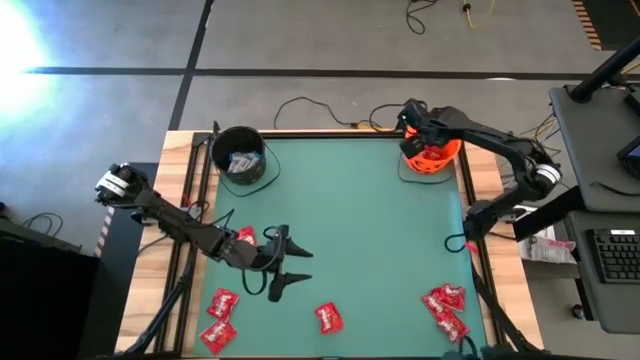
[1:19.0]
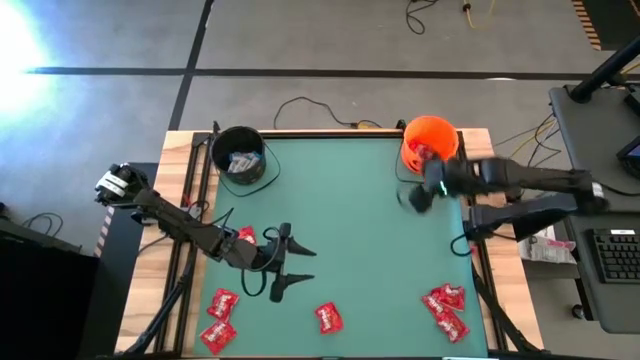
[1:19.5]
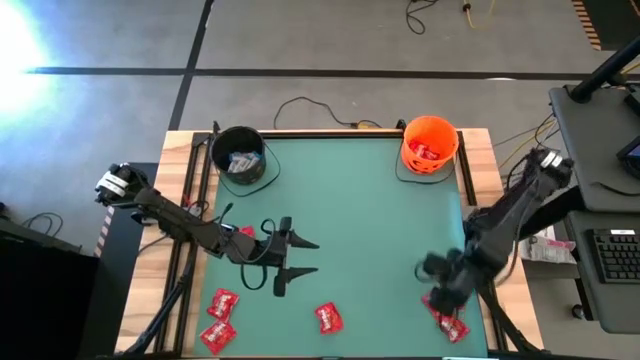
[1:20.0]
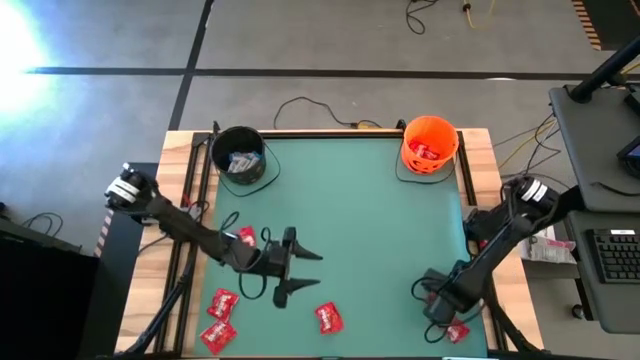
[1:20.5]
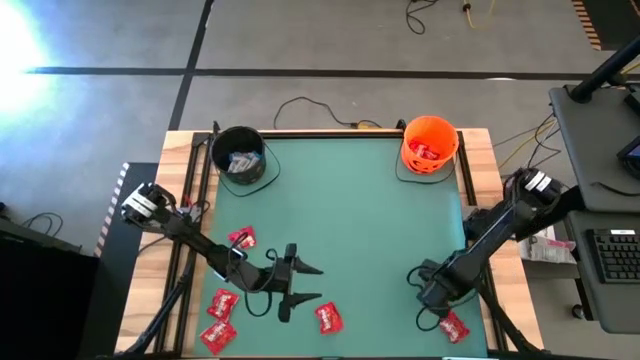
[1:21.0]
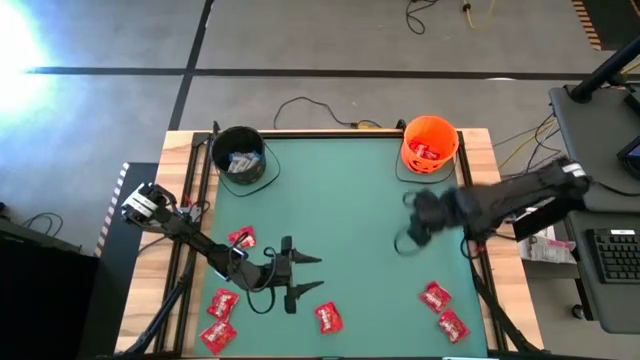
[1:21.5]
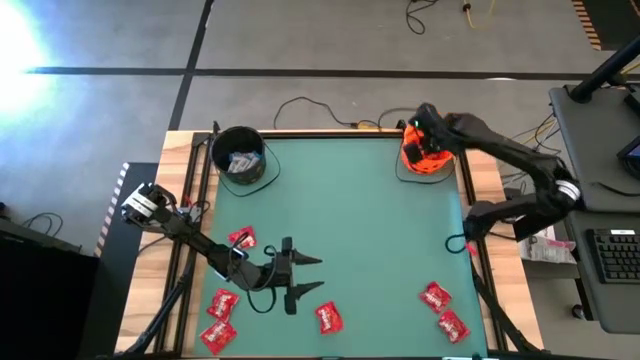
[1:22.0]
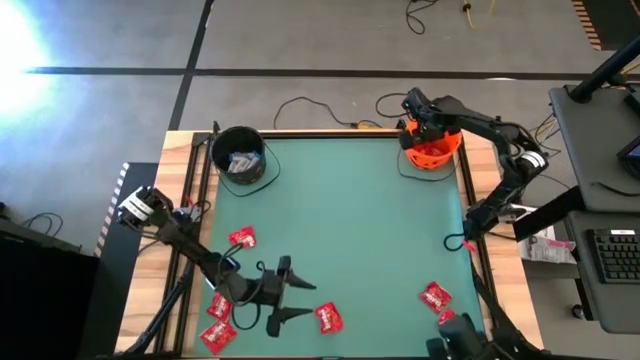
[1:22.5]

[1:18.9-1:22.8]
Task: Sort candy by brand, put in halloween buckets
Put the red candy into the orange bucket

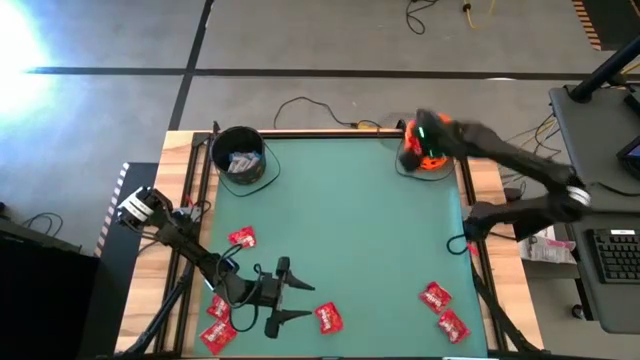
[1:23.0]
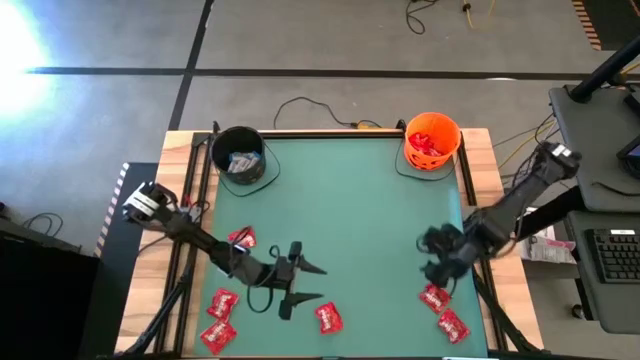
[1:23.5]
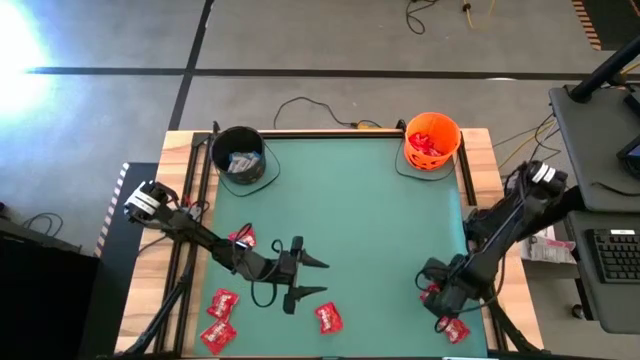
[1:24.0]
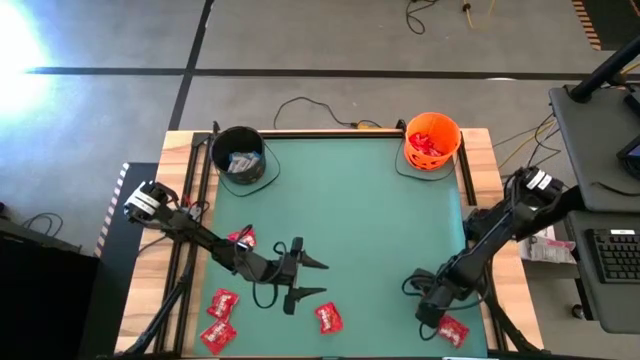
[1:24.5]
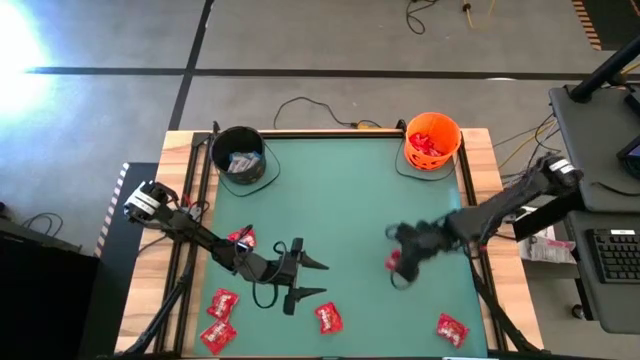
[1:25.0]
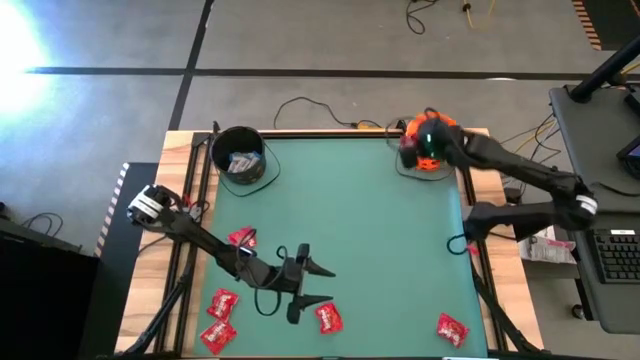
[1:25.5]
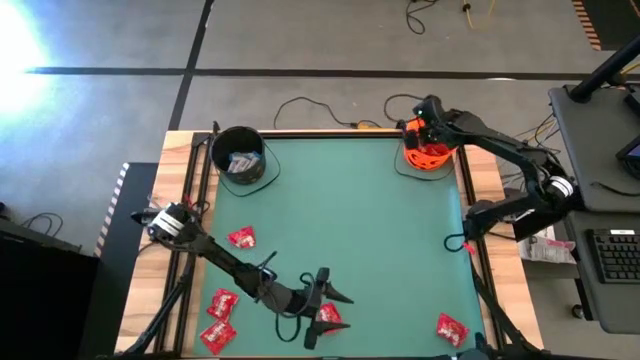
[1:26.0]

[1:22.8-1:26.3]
Put the red candy into the orange bucket

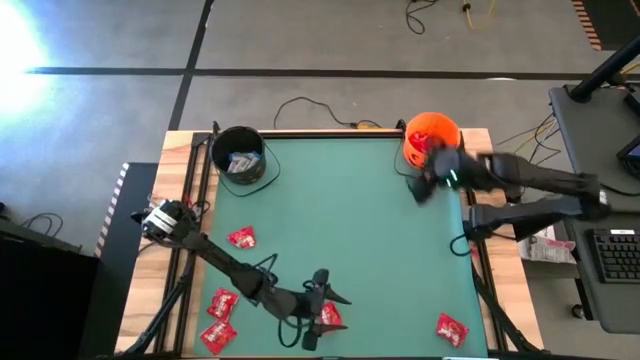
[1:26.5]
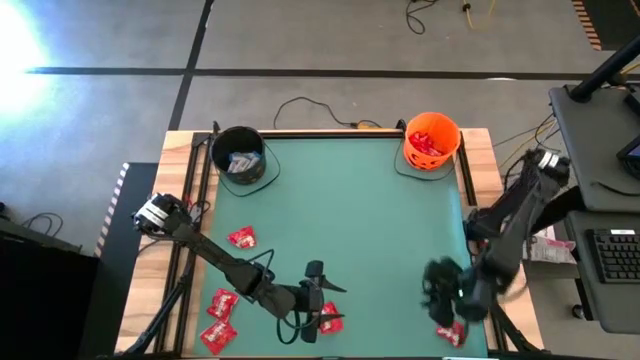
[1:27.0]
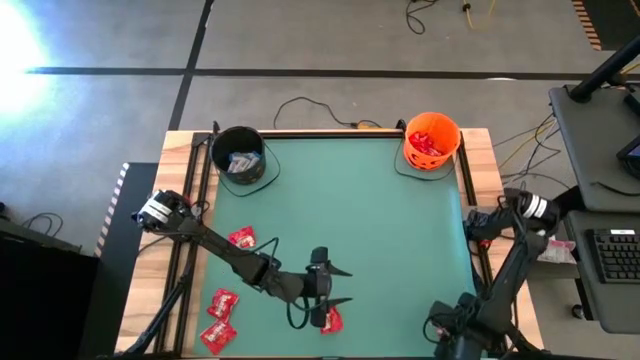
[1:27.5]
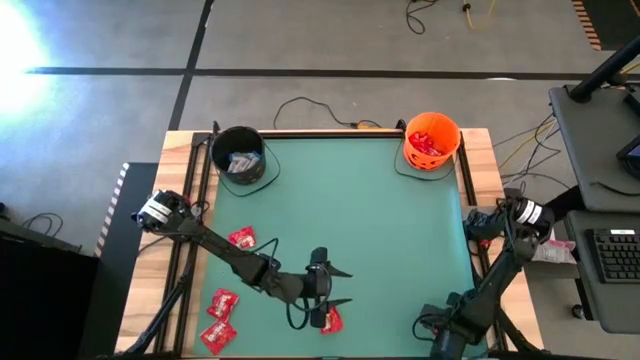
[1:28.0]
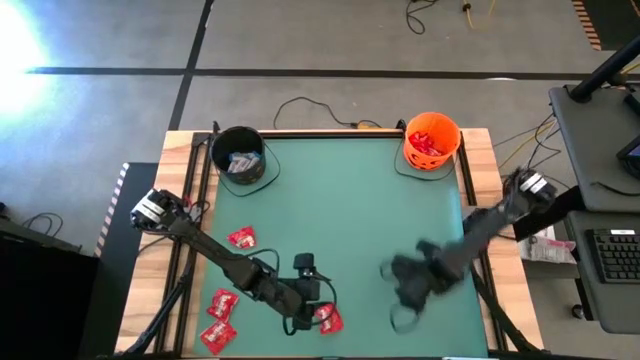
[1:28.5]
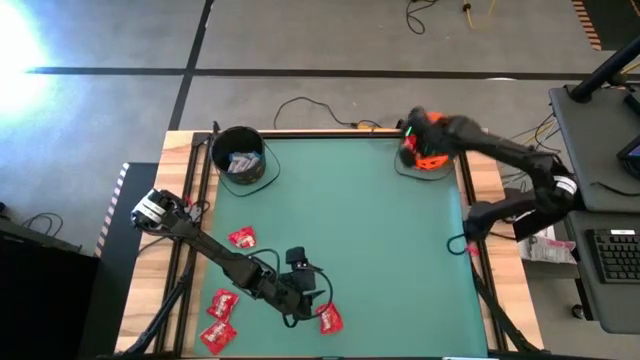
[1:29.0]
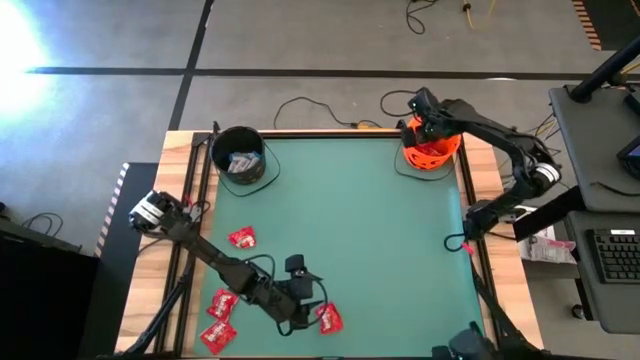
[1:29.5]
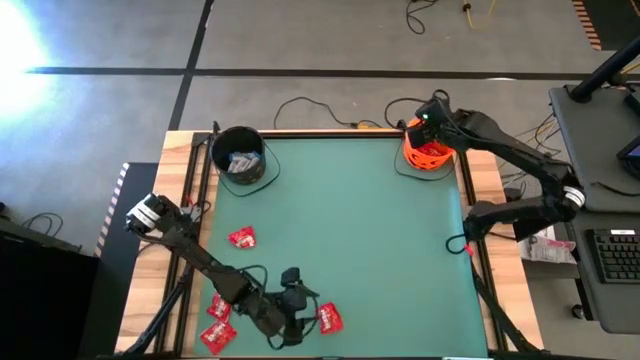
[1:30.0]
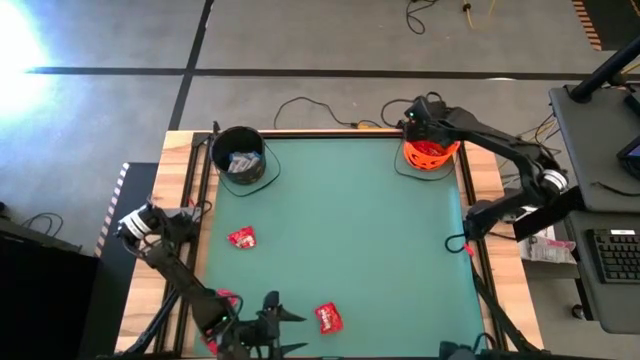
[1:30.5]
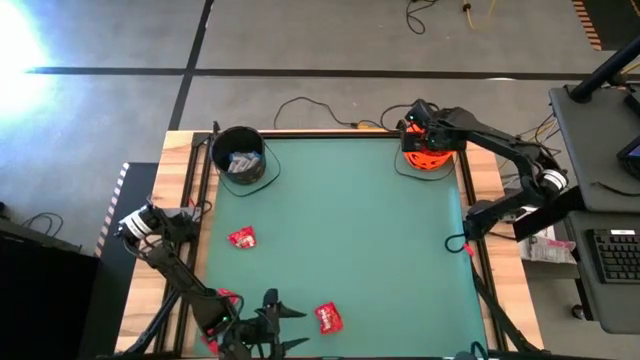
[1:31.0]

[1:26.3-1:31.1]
Put the red candy into the orange bucket

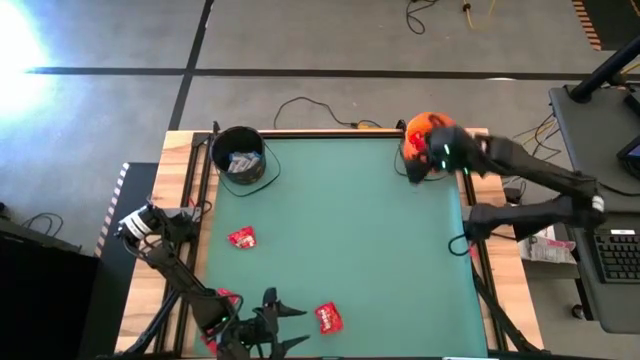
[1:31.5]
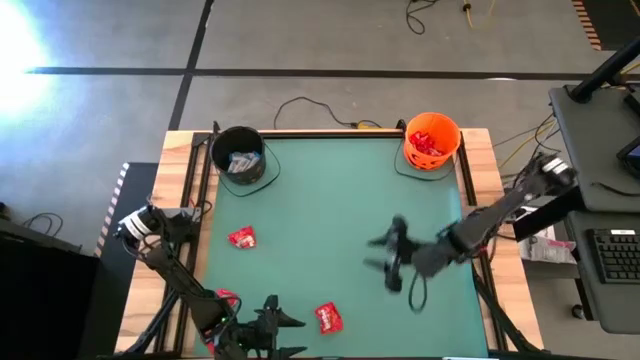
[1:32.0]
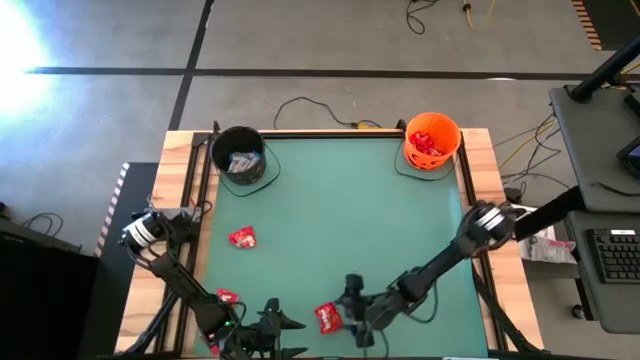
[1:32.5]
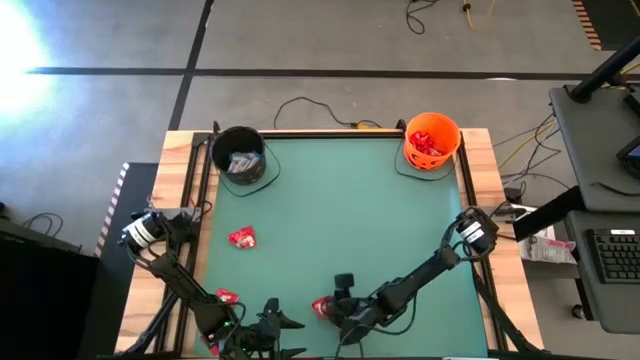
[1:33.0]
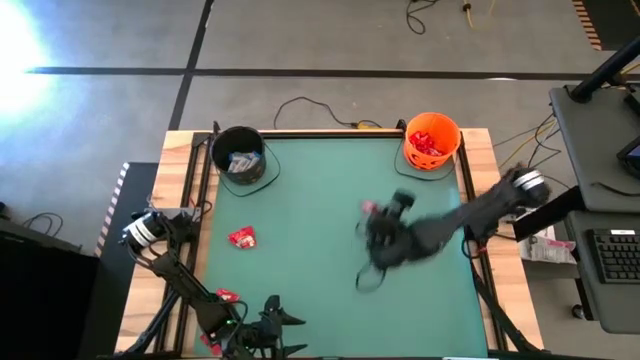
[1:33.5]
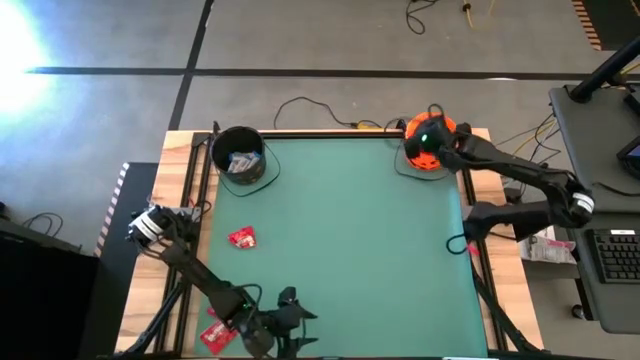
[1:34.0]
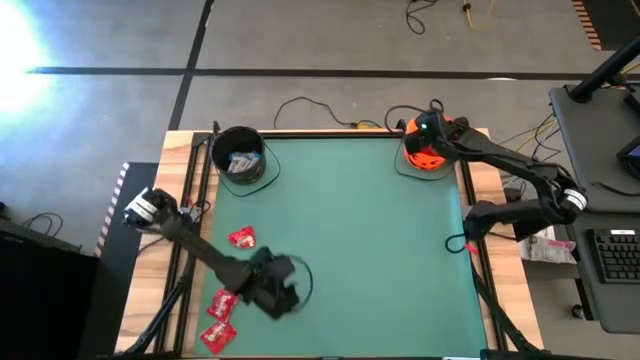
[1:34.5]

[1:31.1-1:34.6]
Put the red candy into the orange bucket

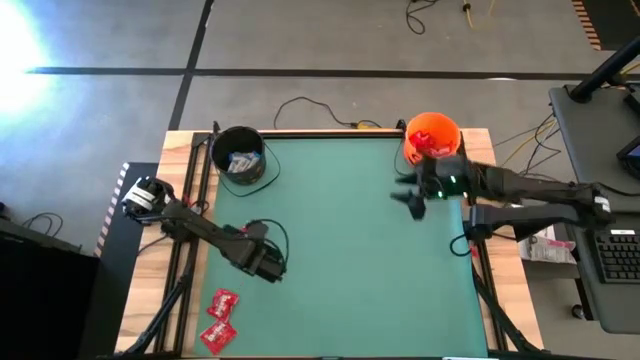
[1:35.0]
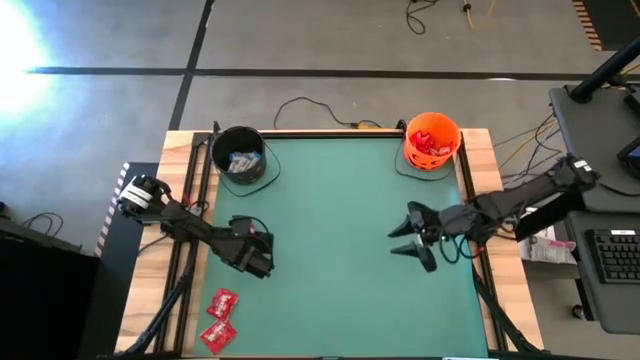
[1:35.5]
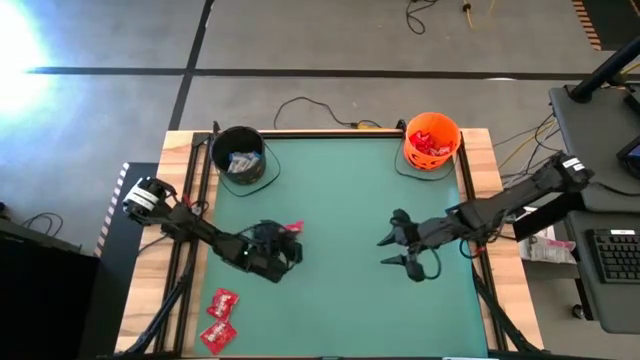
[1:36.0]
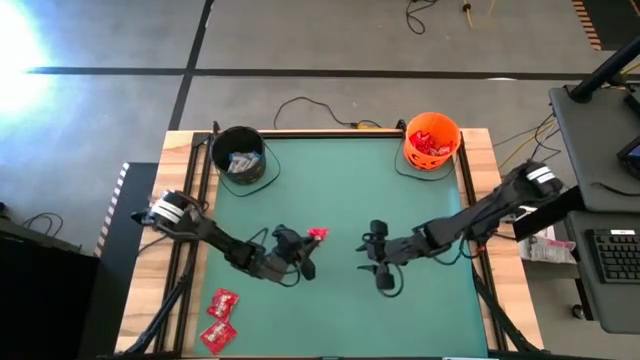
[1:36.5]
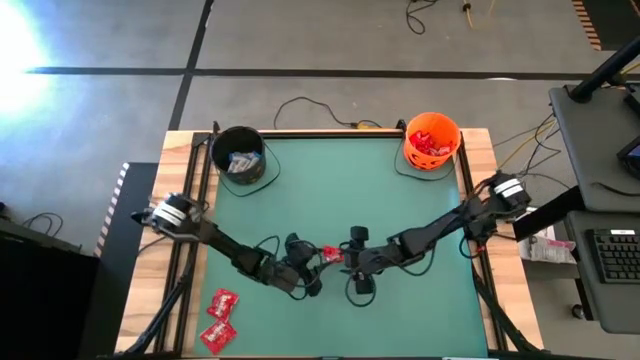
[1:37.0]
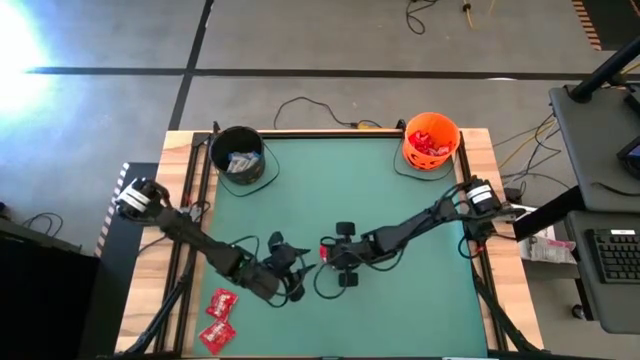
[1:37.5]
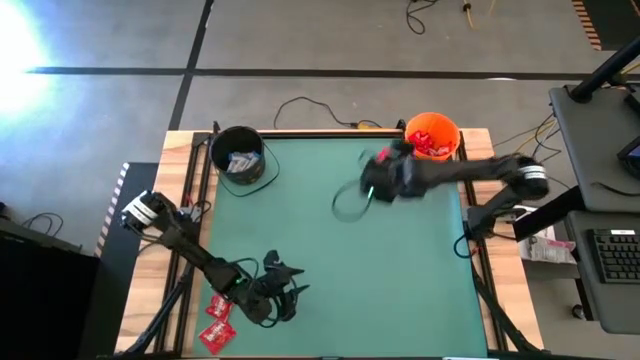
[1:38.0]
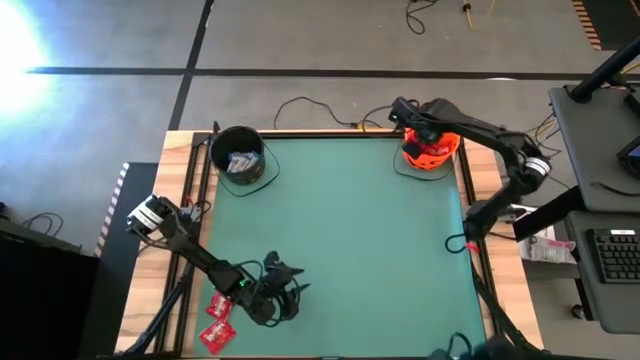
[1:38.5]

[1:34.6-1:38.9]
Put the red candy into the orange bucket

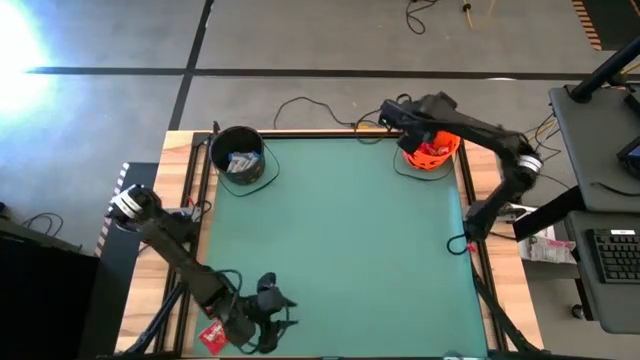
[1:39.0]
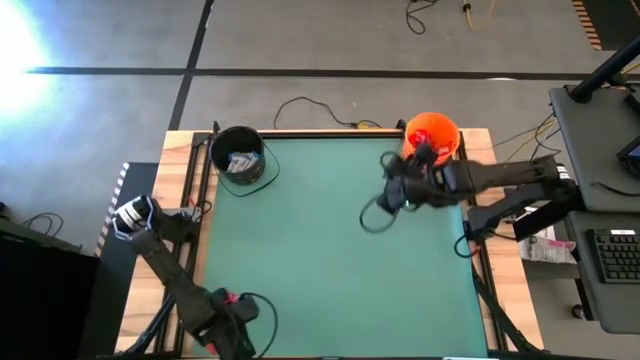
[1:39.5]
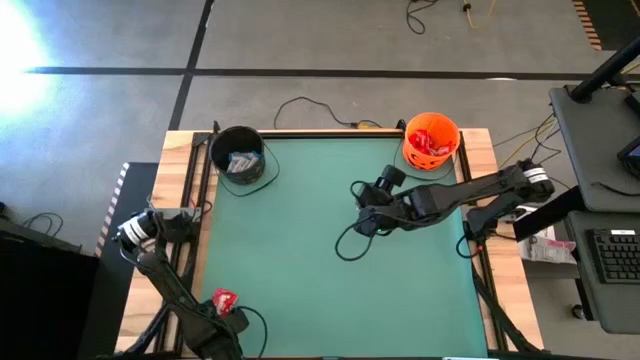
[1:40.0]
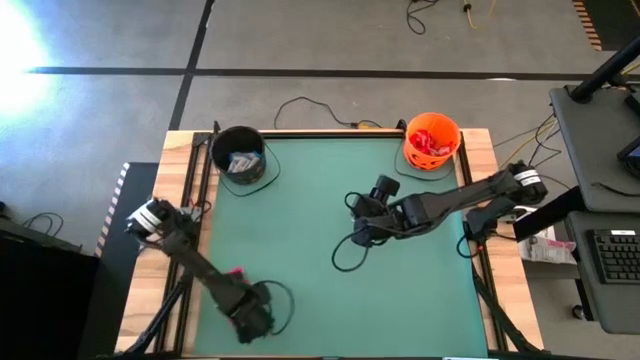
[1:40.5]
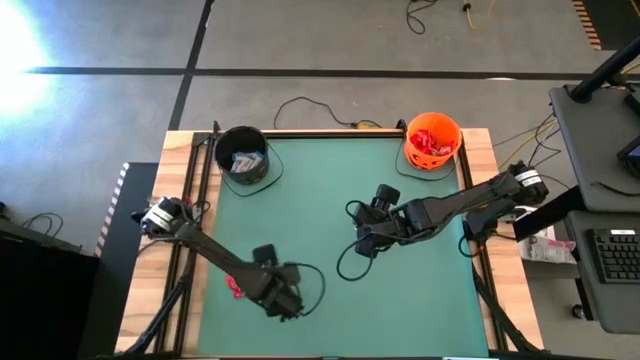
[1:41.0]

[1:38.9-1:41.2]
Adjust the red candy

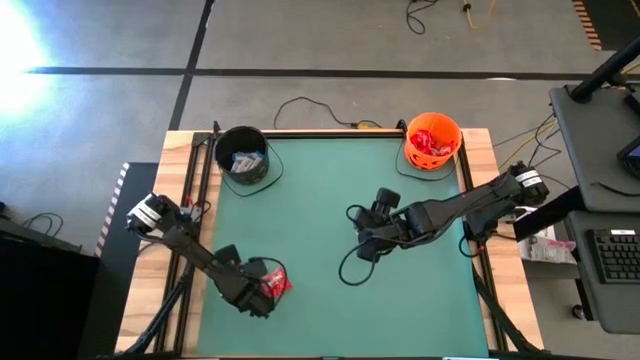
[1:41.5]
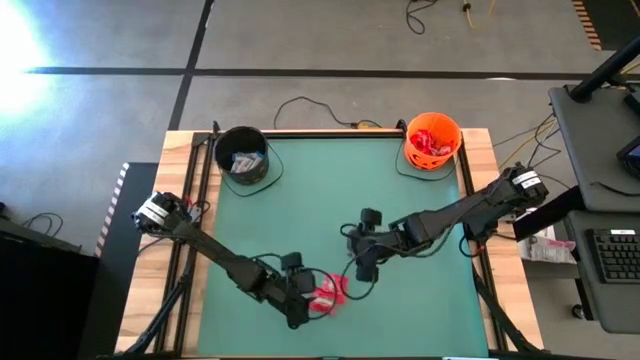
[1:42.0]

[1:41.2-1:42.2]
Adjust the red candy
